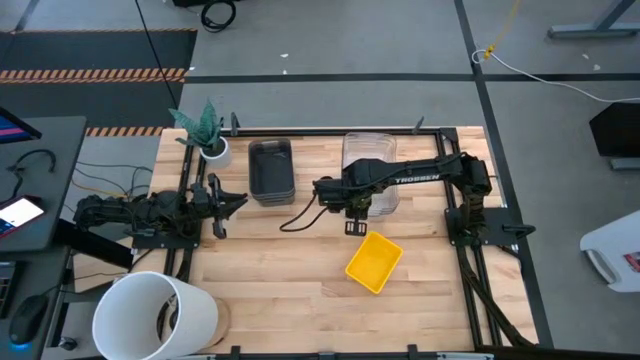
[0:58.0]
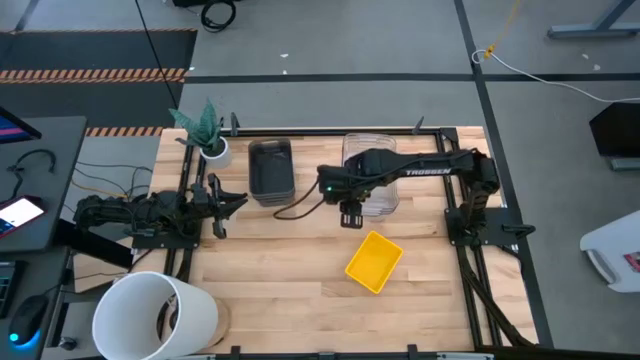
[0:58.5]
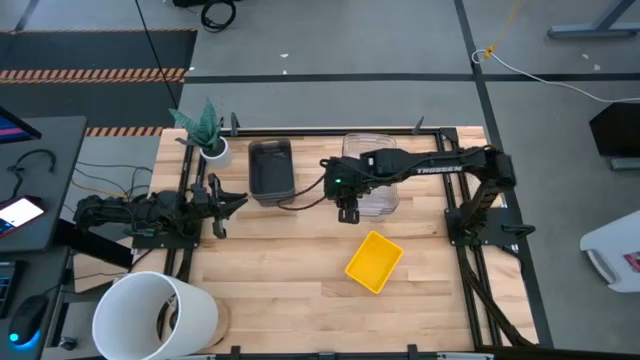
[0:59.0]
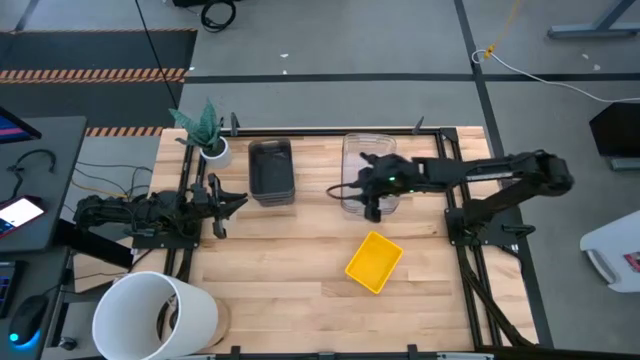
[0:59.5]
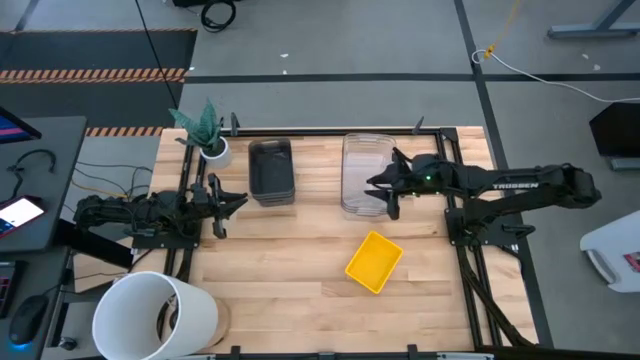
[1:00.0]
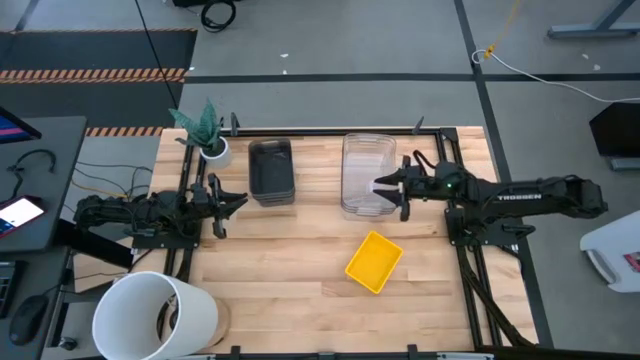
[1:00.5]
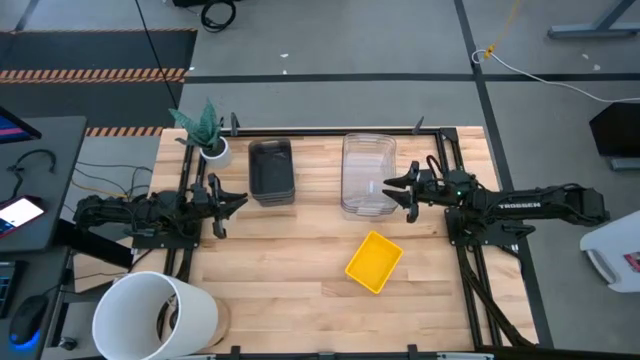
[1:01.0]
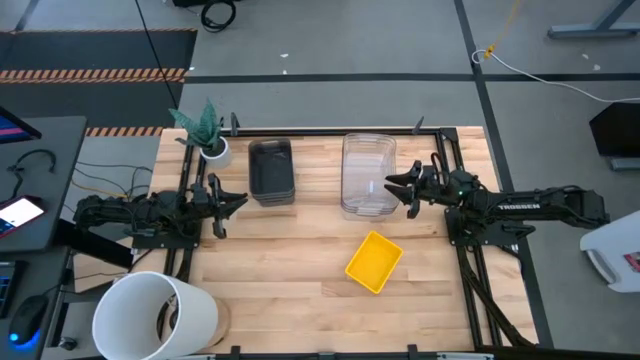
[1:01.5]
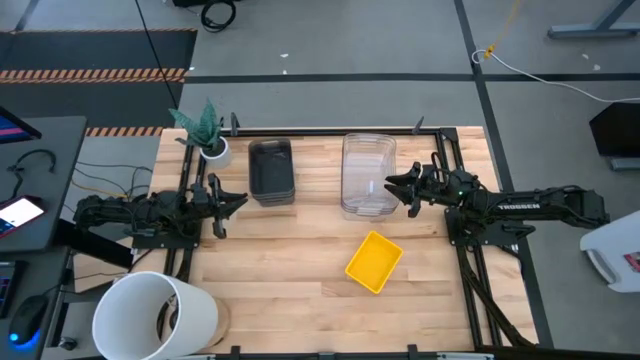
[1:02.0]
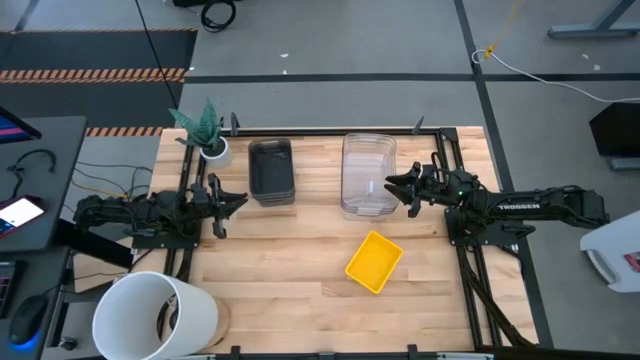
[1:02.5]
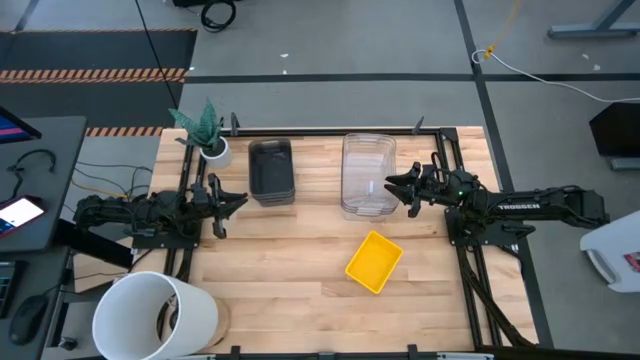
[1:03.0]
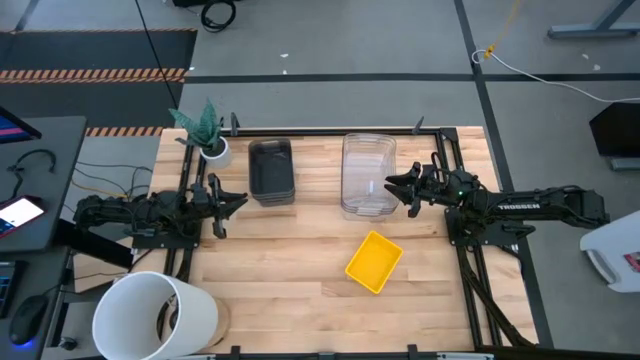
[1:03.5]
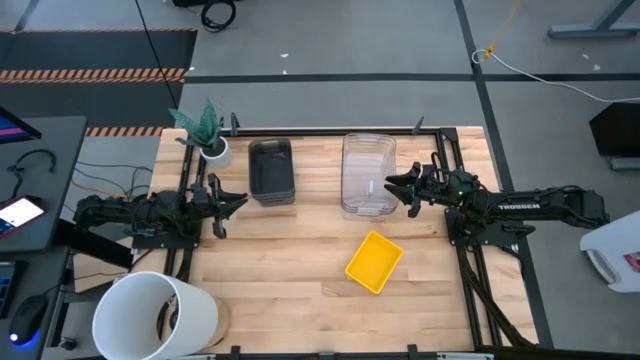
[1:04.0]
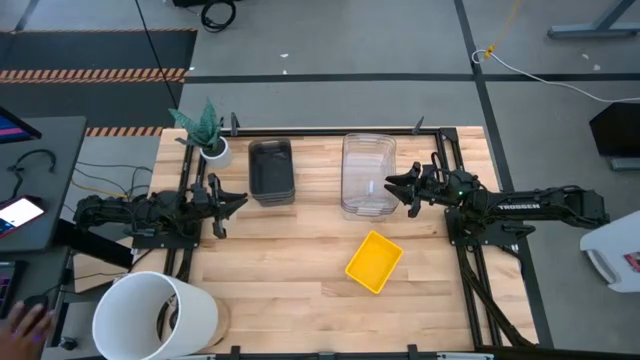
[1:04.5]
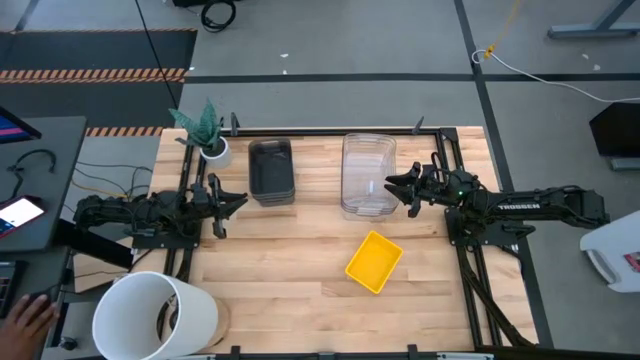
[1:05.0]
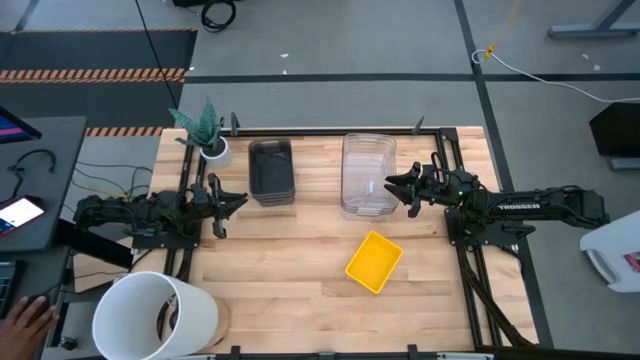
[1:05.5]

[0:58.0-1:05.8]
Return to Home Position
